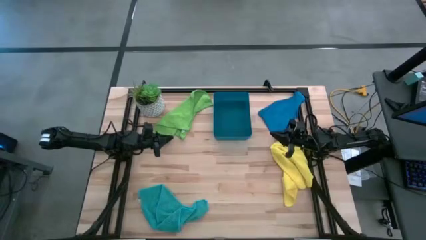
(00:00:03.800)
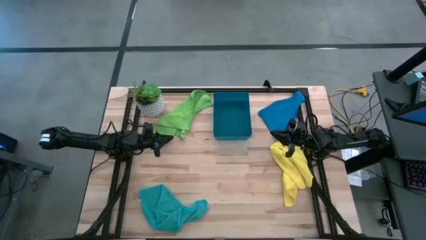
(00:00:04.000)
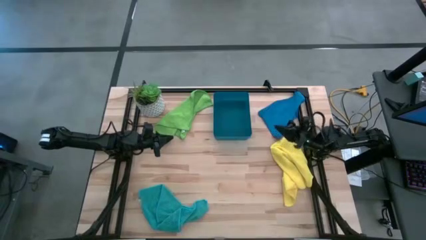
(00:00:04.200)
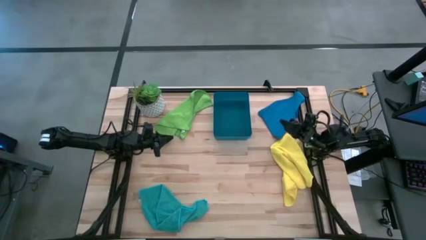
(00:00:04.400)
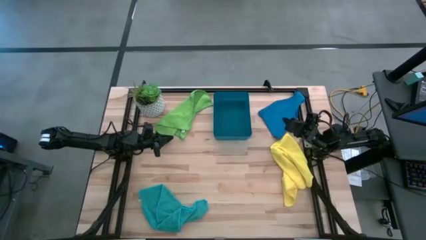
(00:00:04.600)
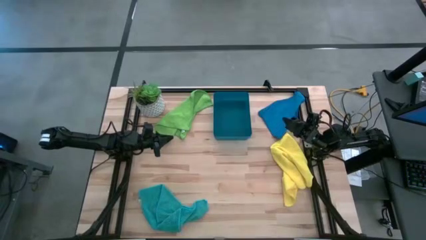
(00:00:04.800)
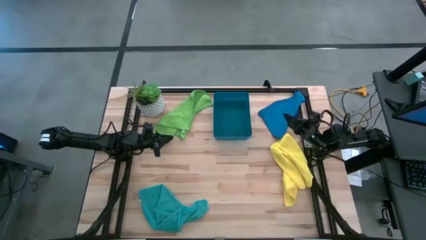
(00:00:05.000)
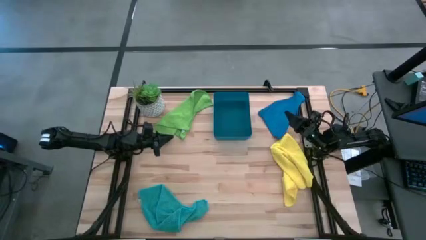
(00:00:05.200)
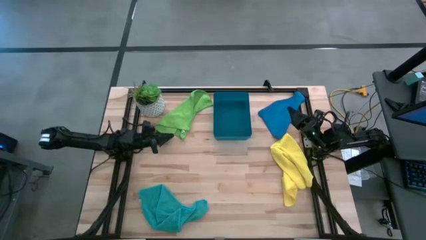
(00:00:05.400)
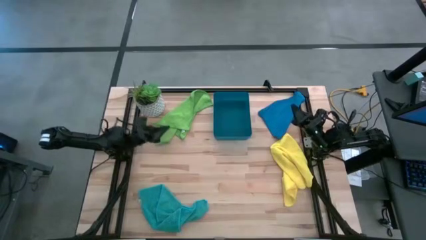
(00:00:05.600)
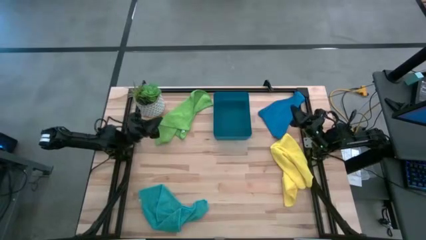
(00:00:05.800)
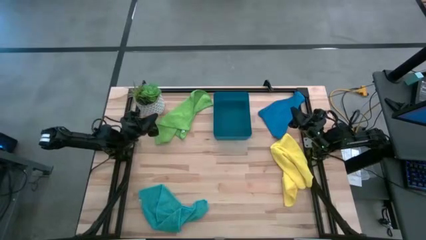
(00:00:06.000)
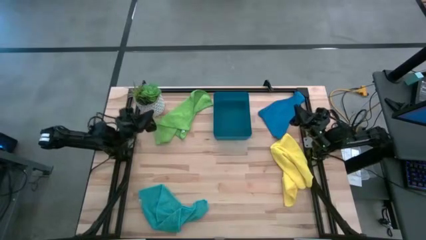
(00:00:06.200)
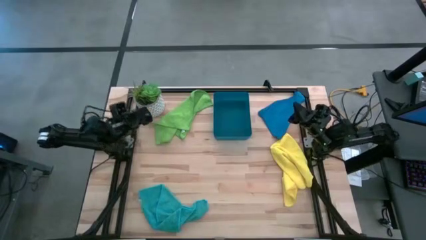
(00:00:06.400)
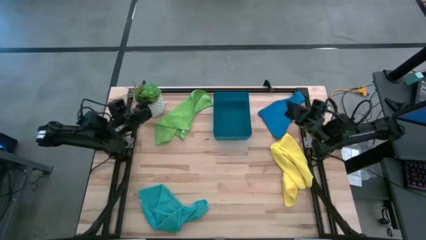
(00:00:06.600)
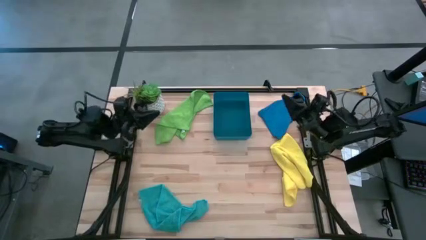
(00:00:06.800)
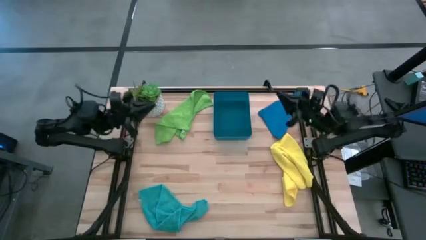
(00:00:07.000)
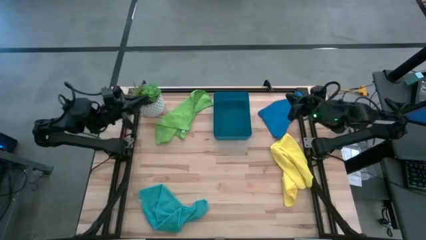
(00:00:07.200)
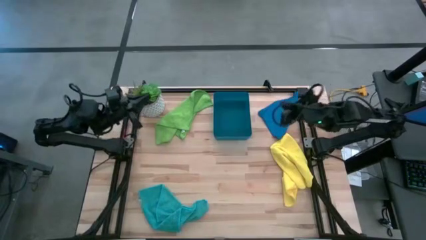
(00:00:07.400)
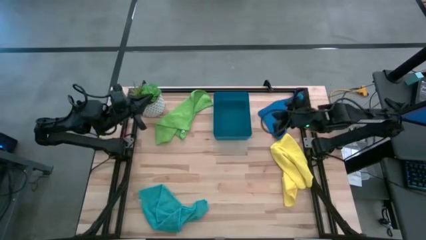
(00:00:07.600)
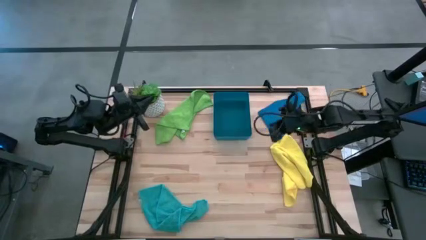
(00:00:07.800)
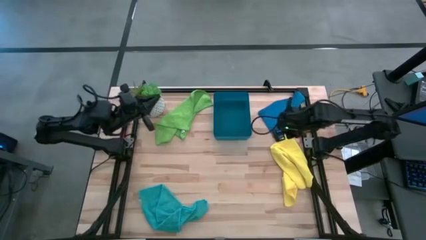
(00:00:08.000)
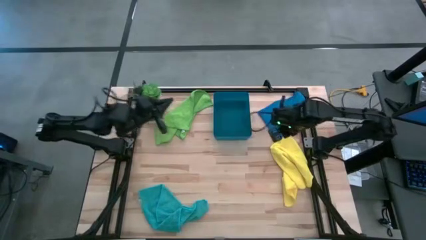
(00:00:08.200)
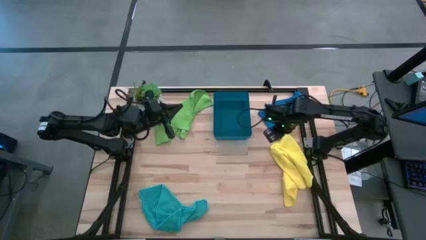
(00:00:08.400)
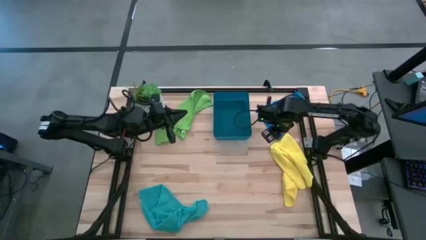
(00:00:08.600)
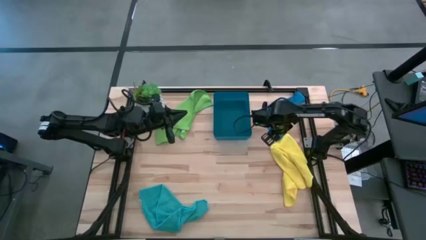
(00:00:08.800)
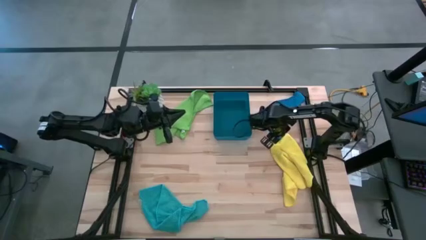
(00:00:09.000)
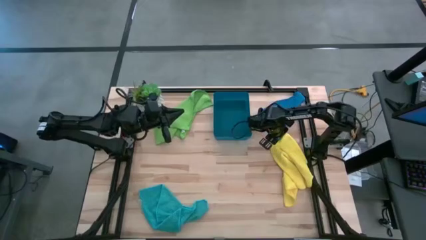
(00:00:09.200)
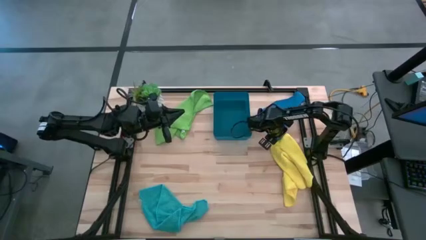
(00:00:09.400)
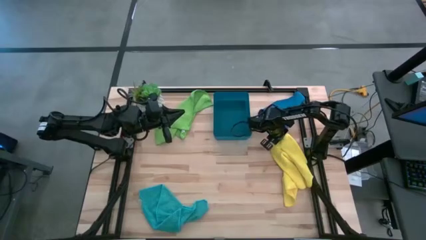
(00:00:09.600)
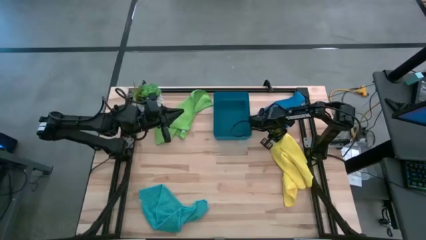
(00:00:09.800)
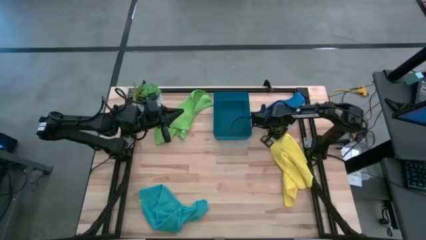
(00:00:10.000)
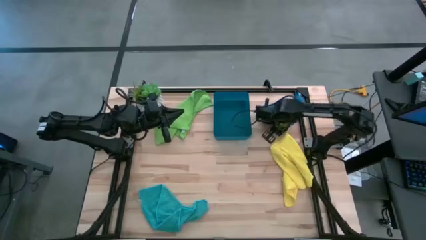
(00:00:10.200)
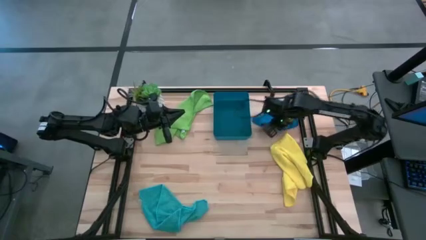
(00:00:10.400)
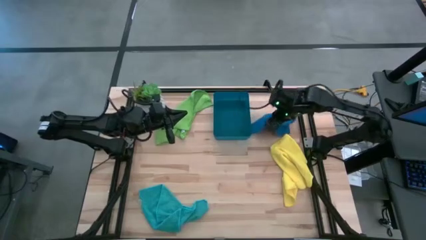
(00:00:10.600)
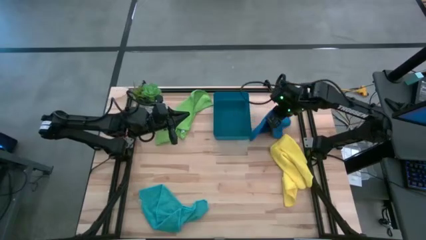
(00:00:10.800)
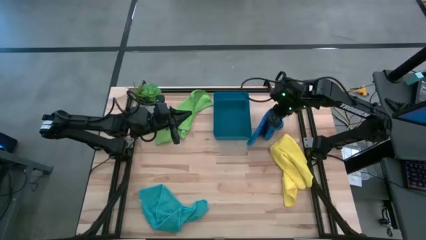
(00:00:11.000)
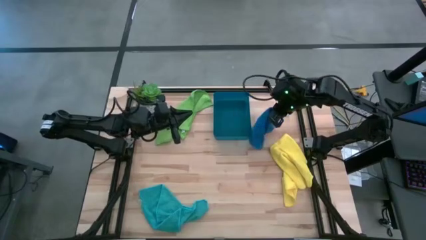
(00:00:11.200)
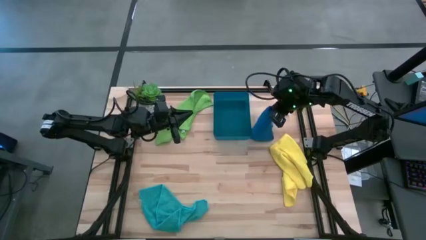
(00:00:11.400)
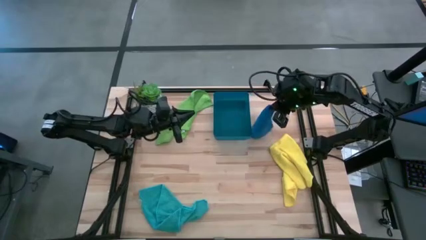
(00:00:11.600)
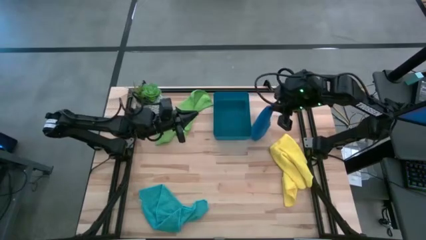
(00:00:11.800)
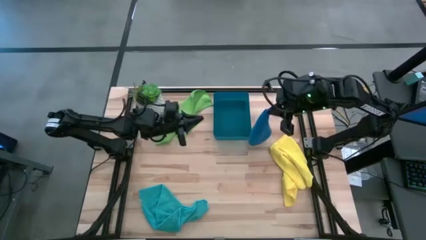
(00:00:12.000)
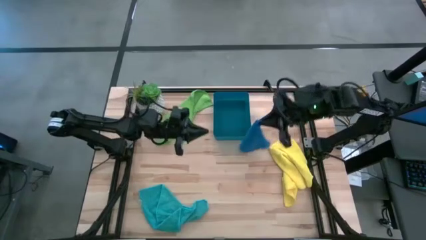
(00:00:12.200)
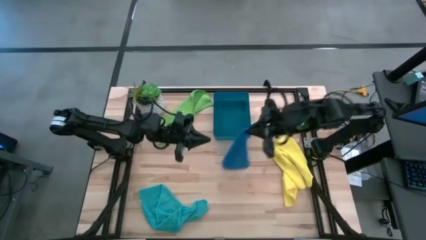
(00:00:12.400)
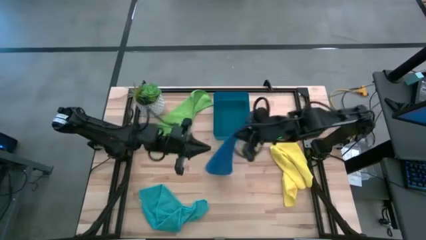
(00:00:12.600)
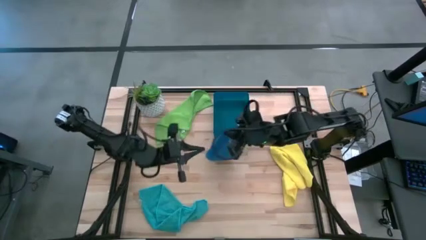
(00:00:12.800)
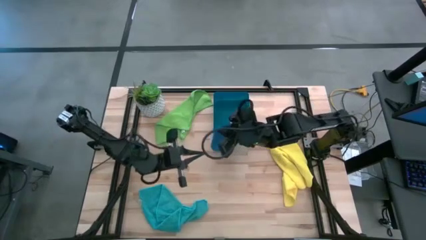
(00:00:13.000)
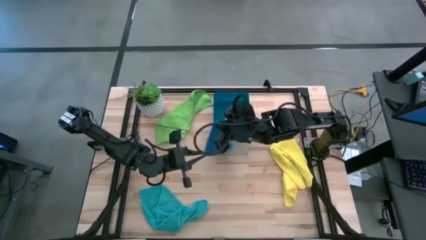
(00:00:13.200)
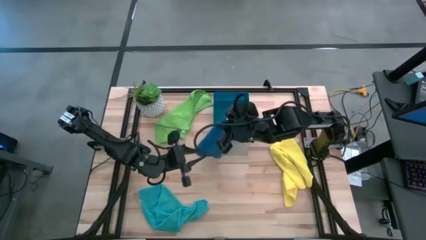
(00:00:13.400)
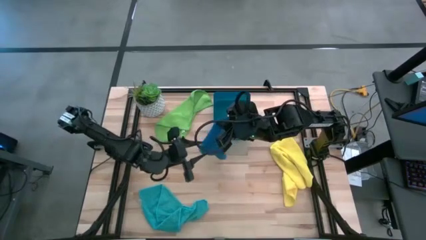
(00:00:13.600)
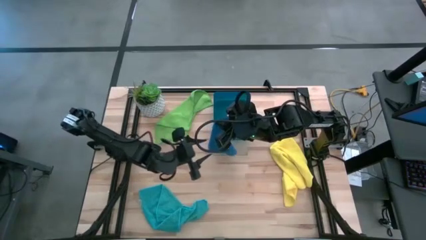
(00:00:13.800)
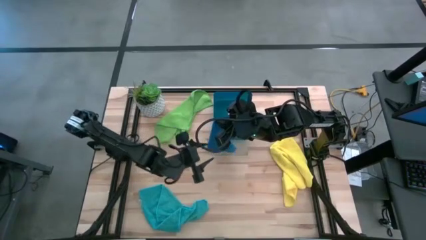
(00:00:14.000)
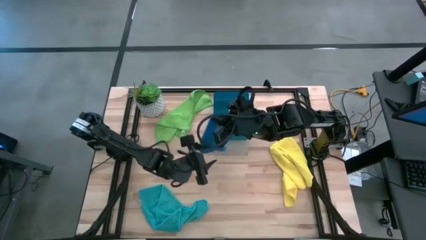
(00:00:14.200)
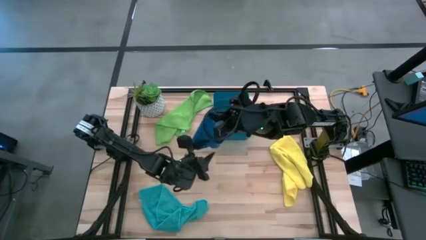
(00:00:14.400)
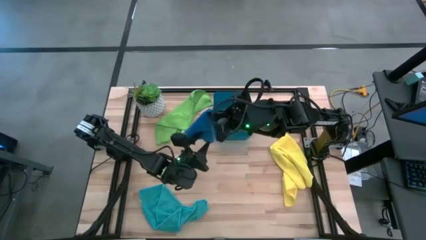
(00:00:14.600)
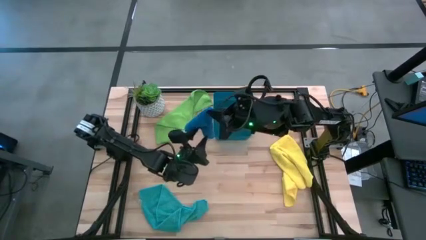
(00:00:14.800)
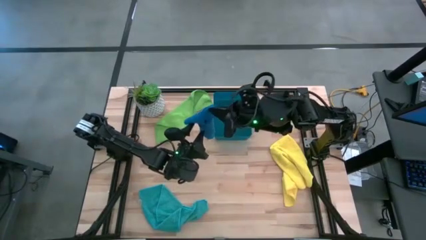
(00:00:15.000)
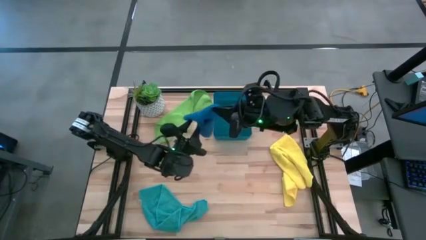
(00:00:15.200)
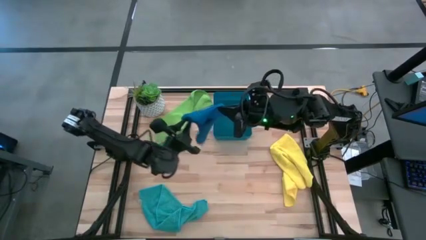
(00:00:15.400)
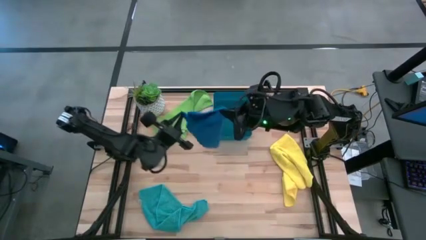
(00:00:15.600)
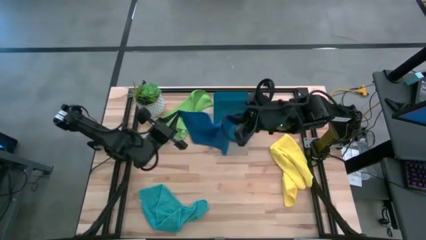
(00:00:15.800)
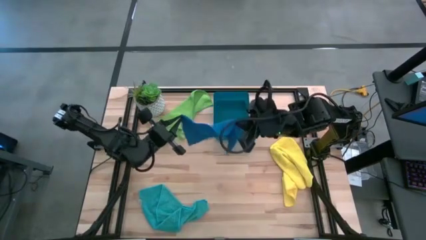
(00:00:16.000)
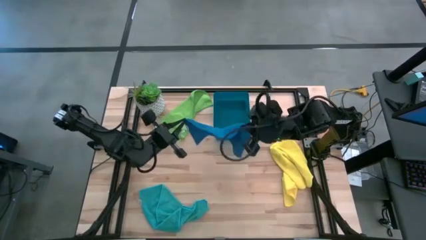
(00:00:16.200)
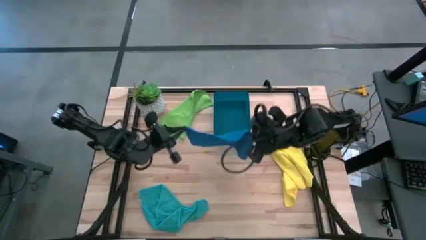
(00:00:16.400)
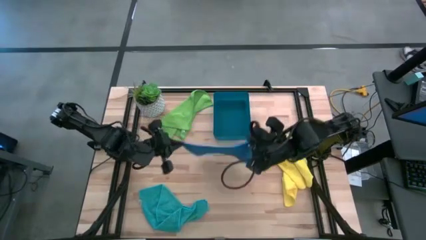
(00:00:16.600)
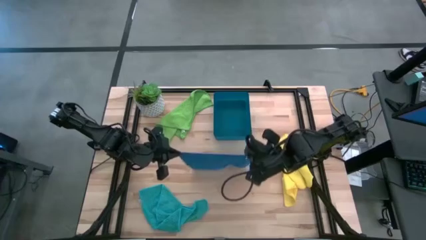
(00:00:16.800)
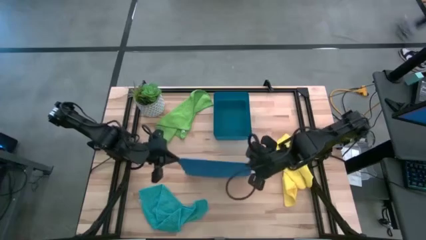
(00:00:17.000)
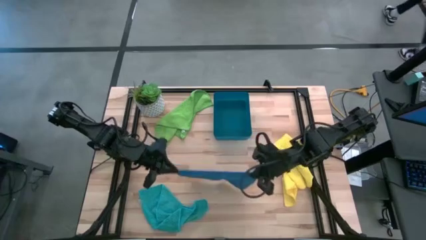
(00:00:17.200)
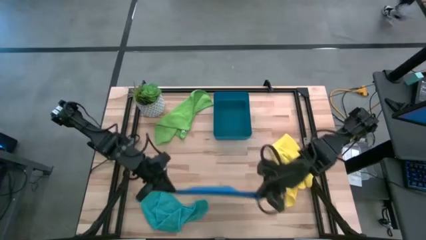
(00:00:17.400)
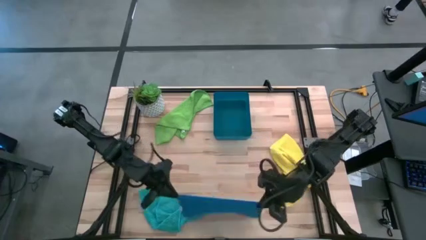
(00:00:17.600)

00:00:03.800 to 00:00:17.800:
Task: Fold microfiber towels
Fold the blue microfiber cloth

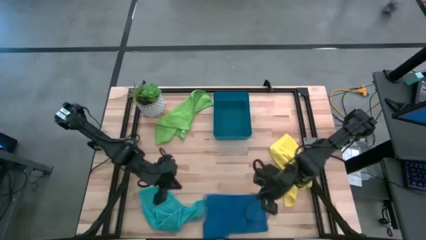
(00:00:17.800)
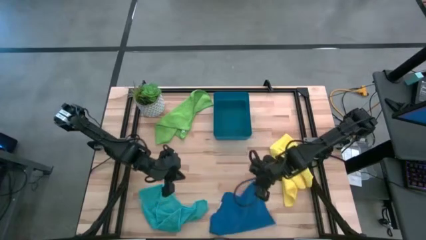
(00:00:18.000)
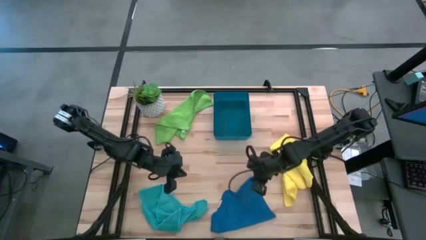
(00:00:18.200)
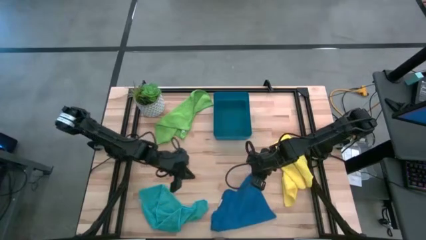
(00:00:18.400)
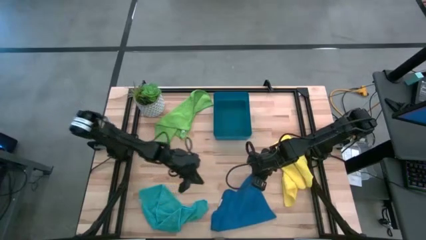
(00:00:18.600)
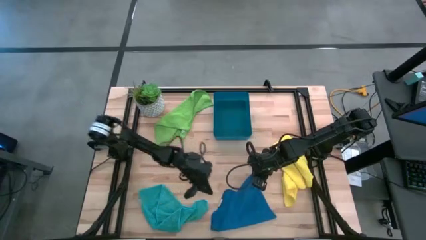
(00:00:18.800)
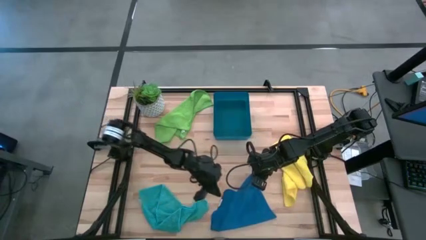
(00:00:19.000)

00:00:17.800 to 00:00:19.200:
Fold the blue microfiber cloth
